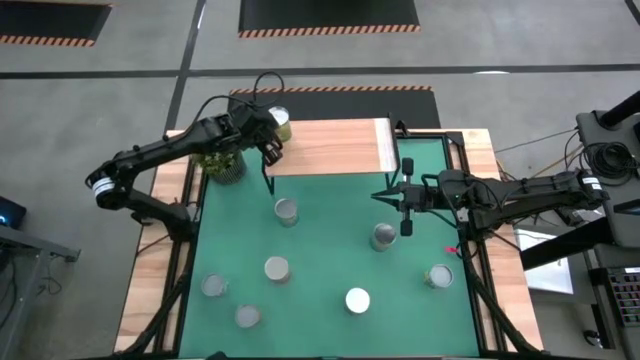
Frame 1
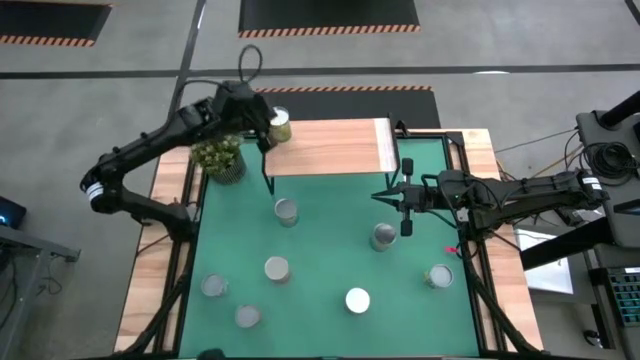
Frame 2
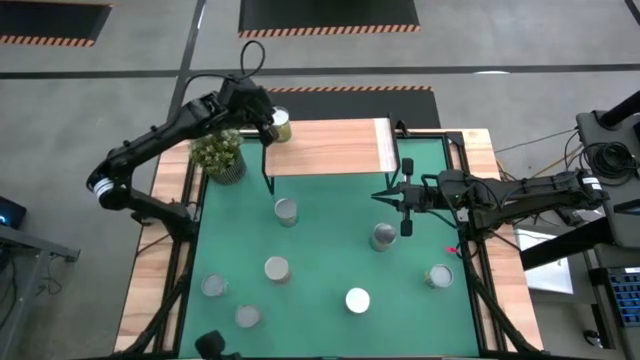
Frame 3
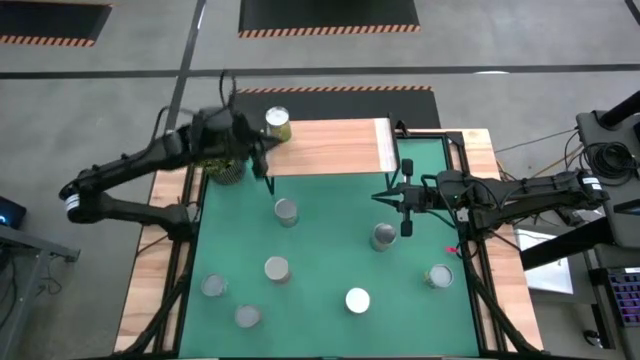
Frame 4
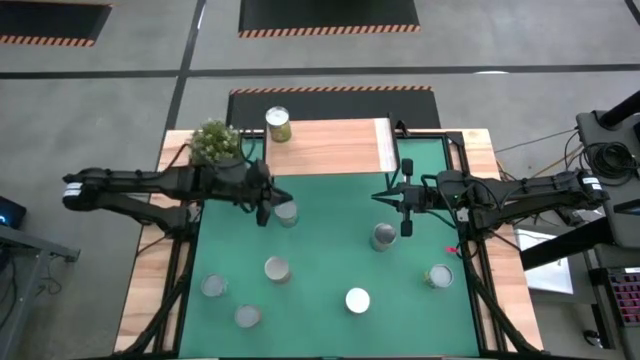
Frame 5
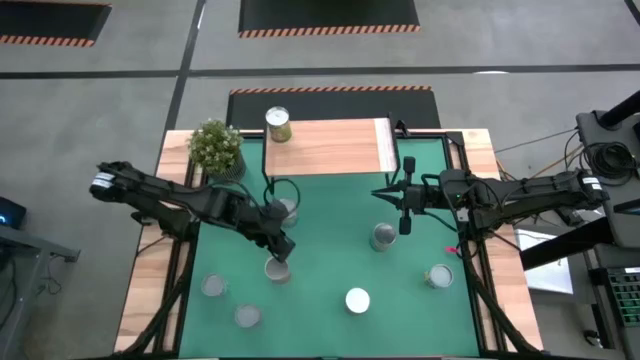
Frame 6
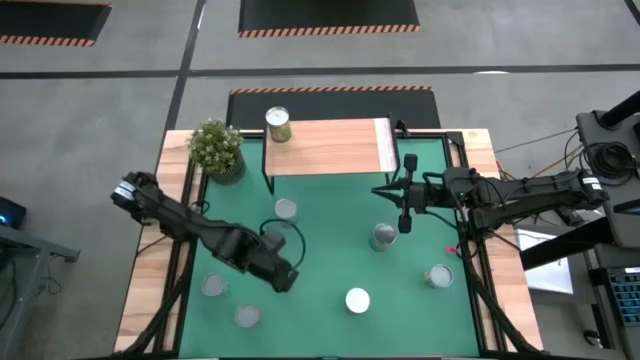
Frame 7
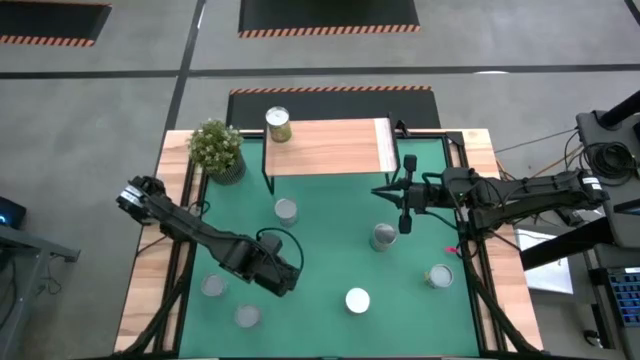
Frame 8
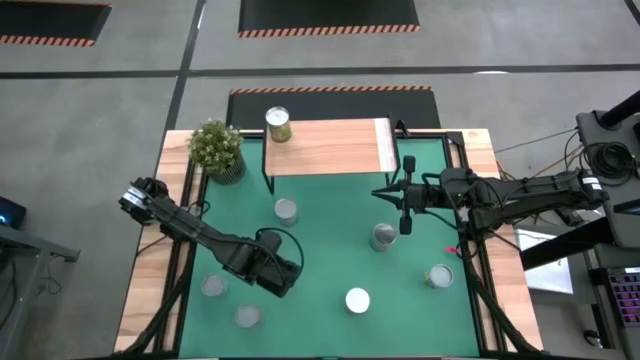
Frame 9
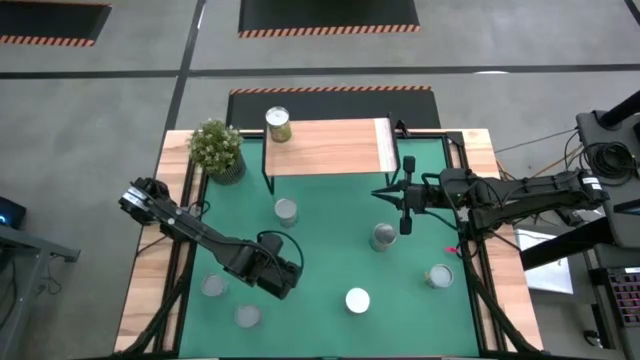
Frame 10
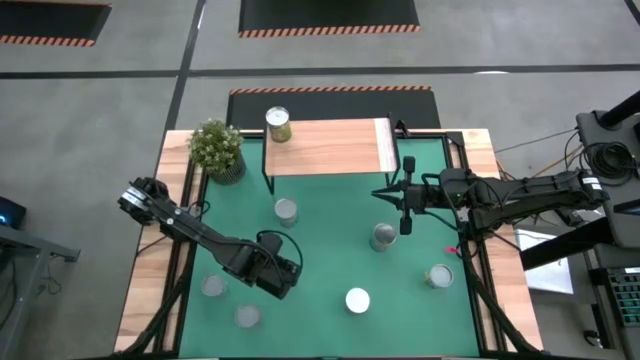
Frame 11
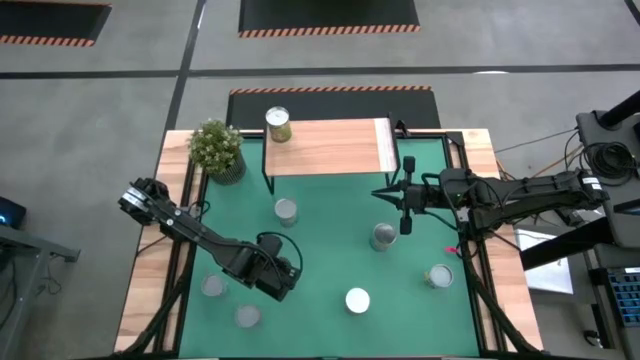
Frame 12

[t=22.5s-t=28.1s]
Task: Pick and place cans onto a shelf
Put the big canned pineapple on the shelf aligned with the other big canned oranges

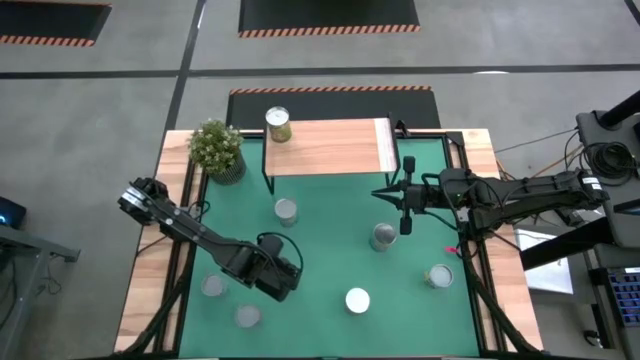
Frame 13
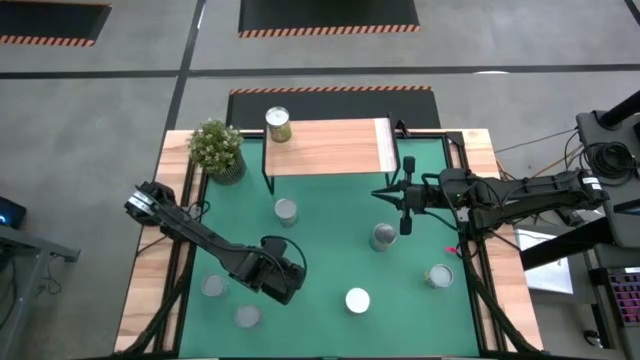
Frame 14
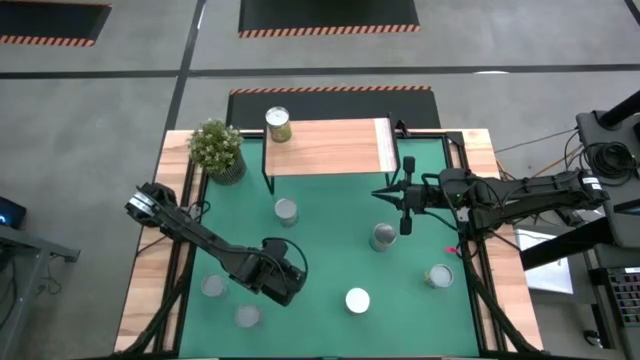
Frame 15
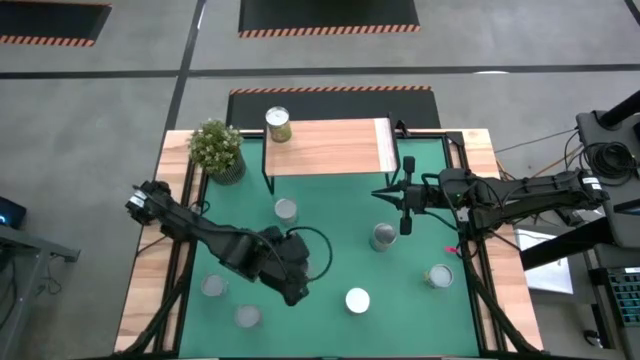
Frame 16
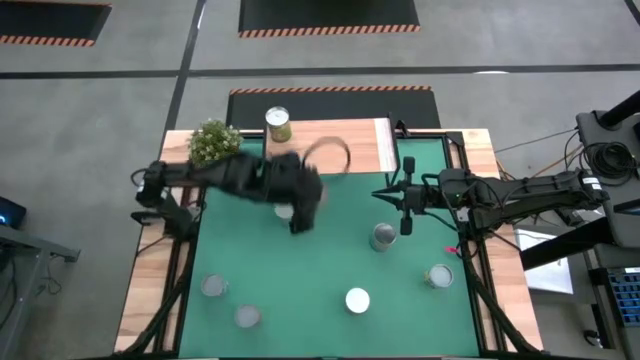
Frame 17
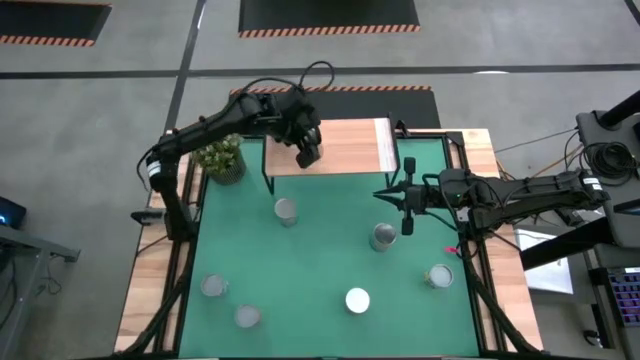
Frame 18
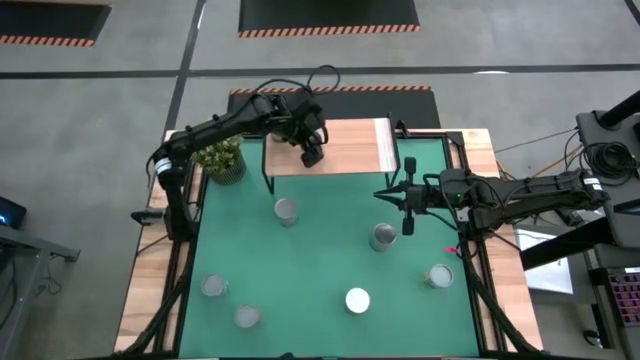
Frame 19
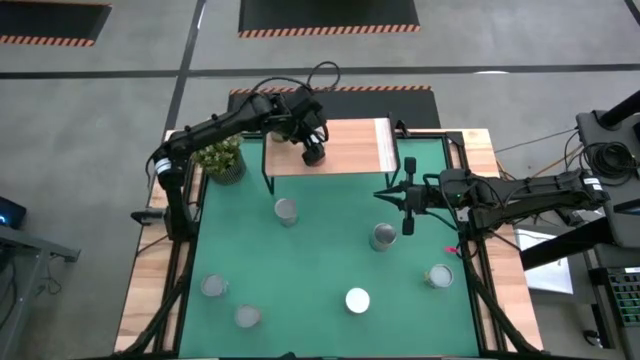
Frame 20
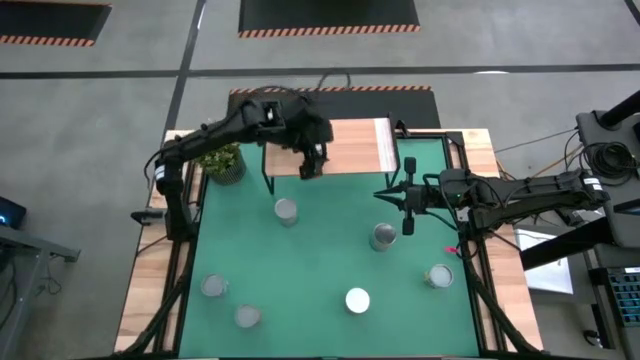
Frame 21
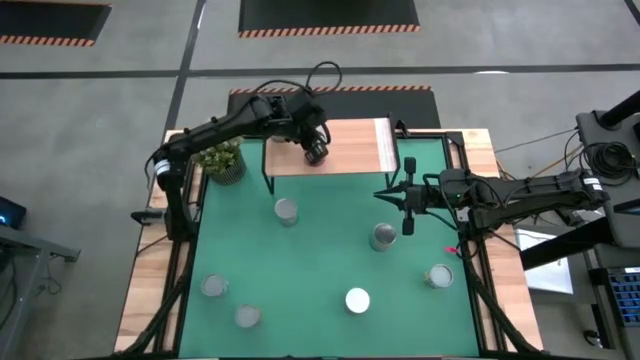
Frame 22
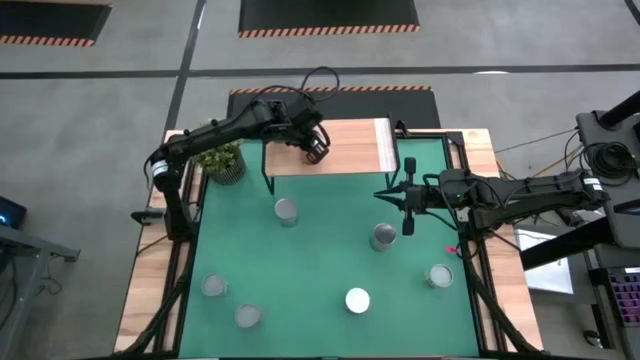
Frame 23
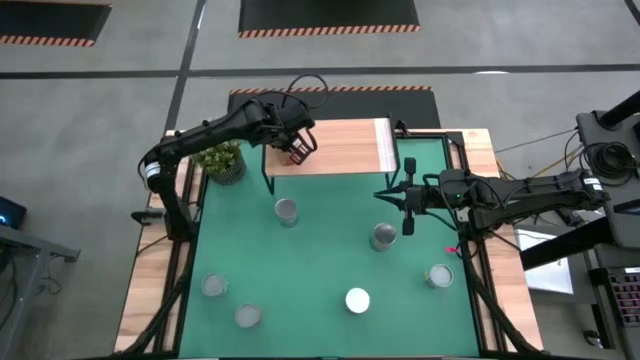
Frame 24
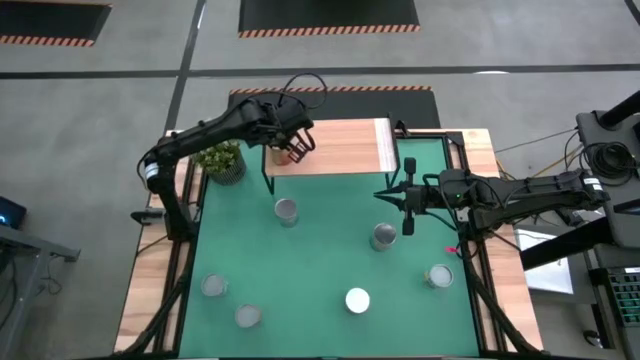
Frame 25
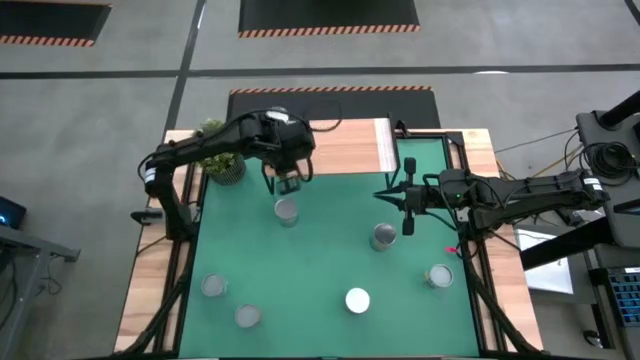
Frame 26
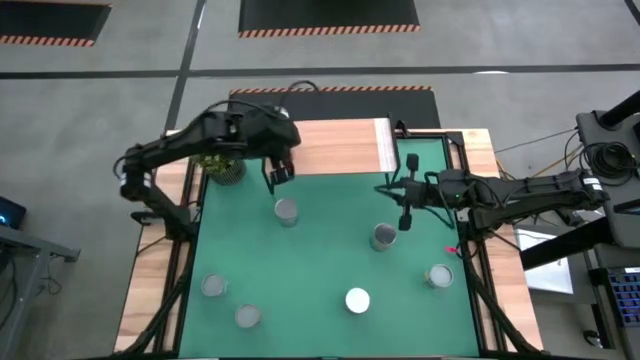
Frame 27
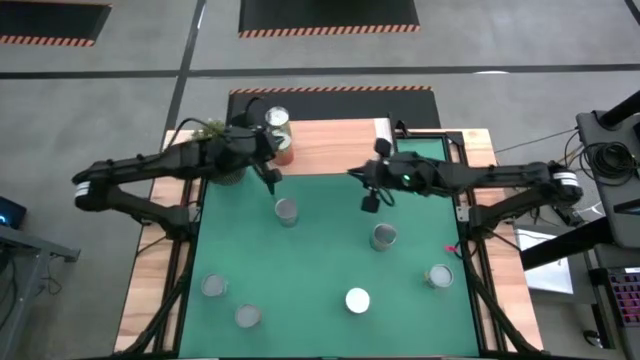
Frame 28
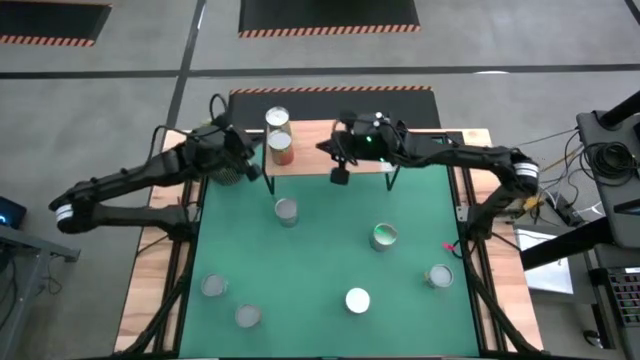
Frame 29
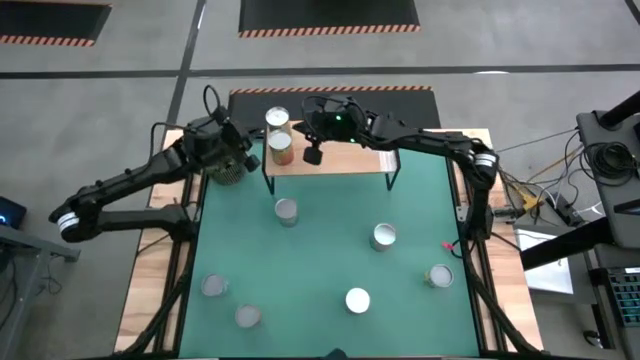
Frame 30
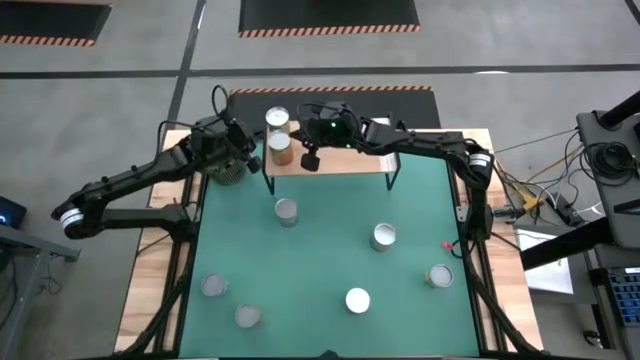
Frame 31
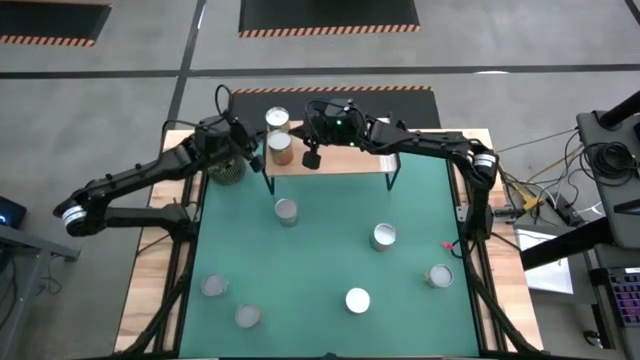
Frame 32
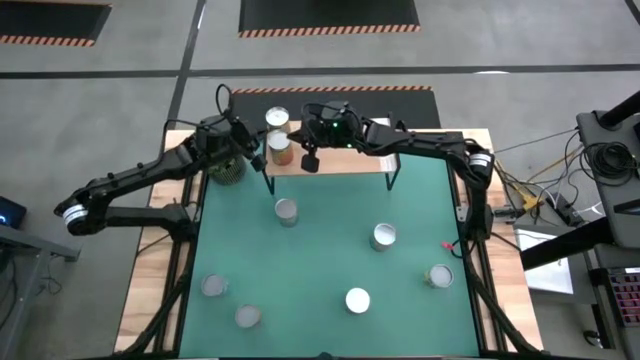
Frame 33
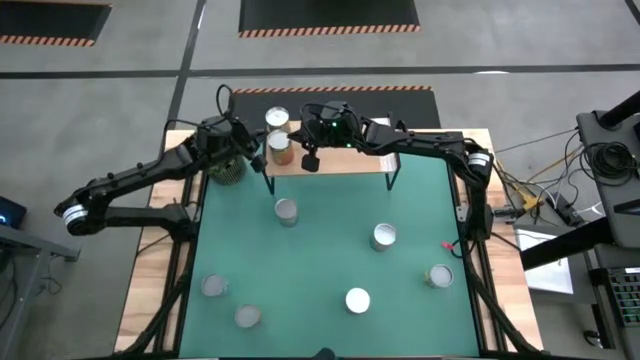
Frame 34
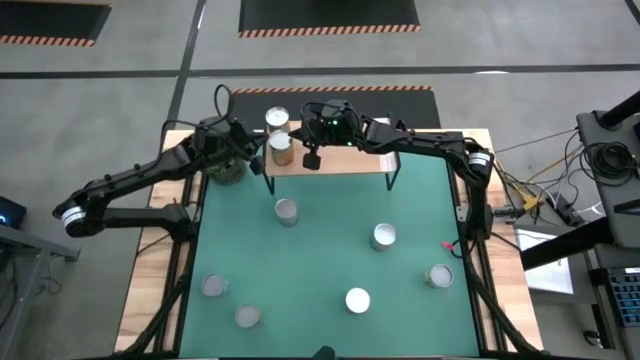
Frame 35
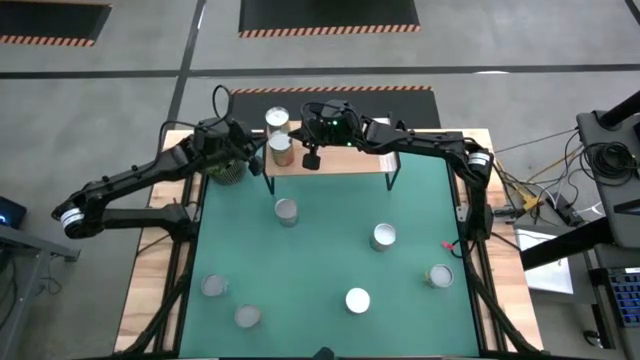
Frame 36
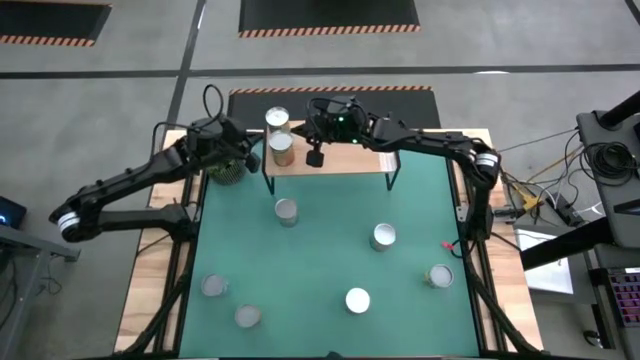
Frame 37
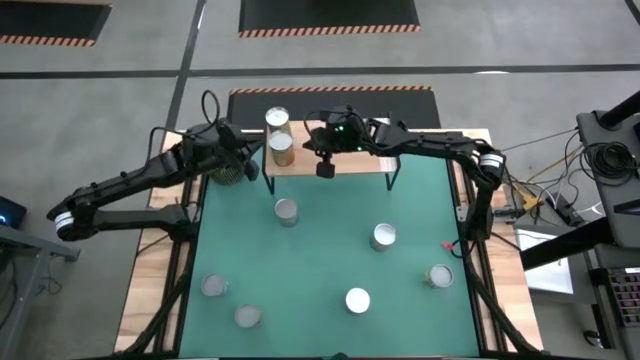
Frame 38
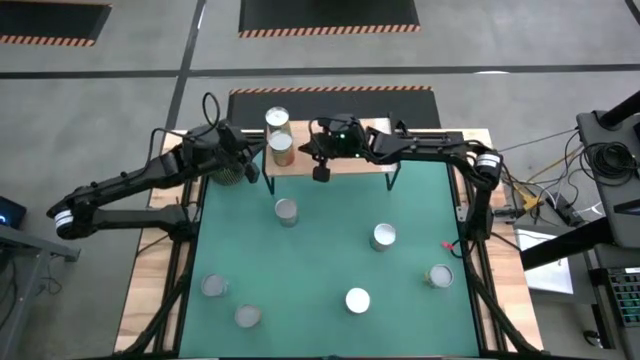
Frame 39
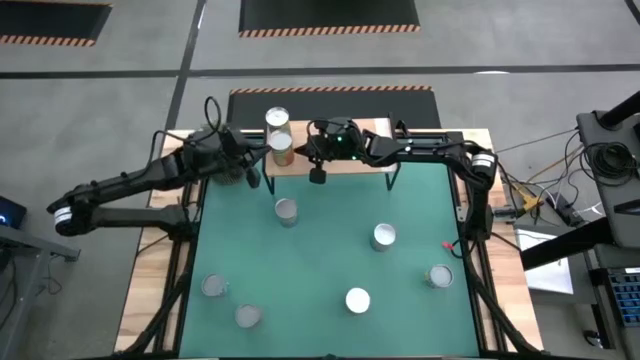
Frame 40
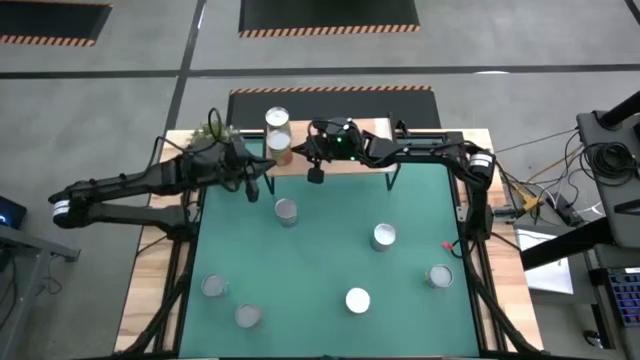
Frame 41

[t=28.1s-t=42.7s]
Put the big canned pineapple on the shelf aligned with the other big canned oranges

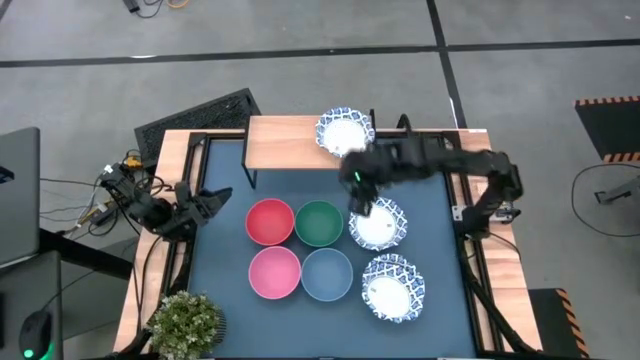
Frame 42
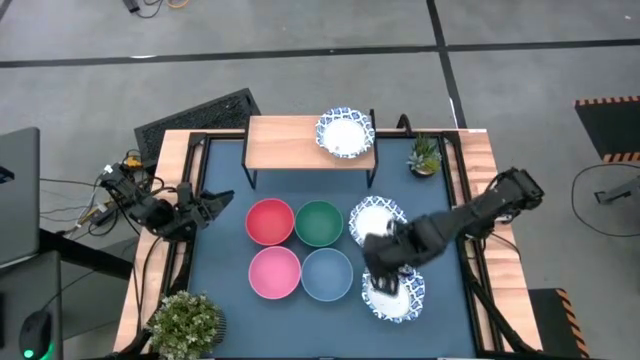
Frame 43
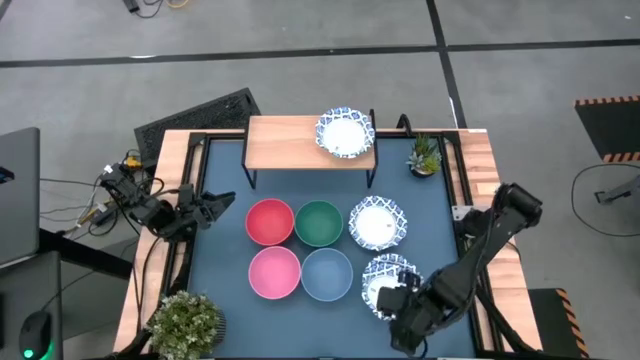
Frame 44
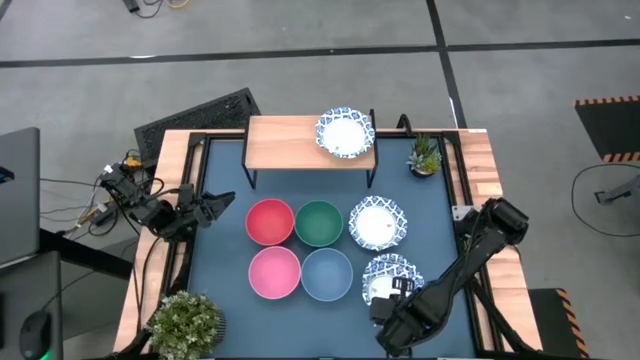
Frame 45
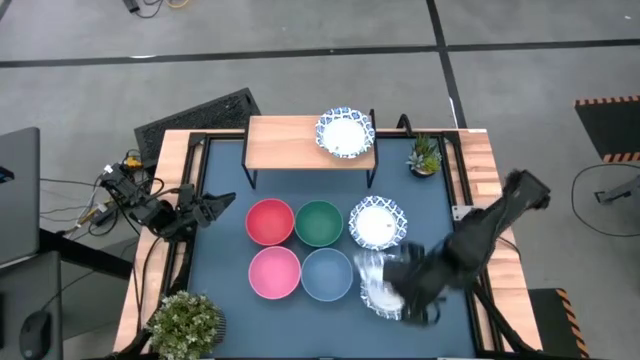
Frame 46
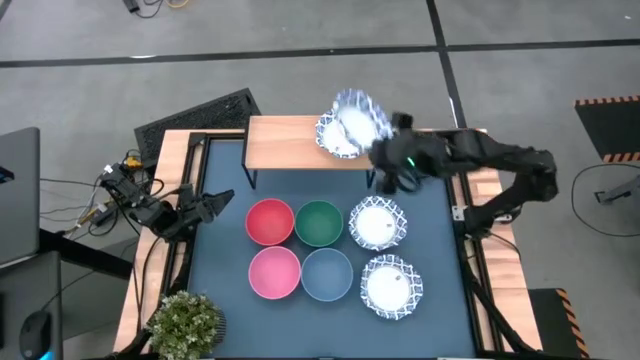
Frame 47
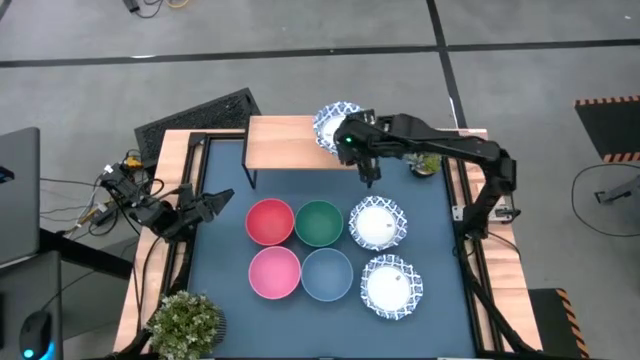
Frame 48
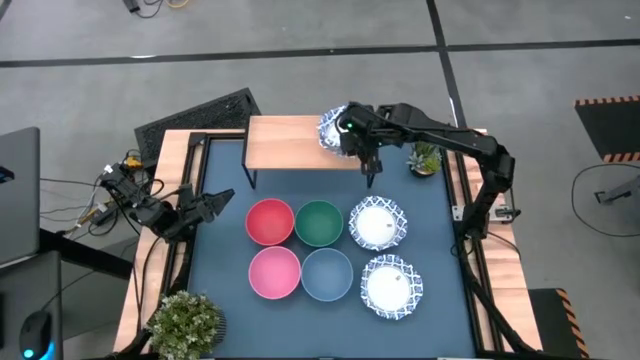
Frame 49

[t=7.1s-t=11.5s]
Task: Place and stack bowls onto a shelf
Stack the bottom white patterned bowl on top of the white patterned bowl on the shelf
